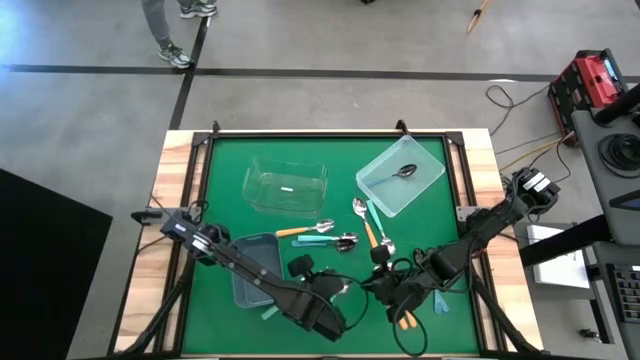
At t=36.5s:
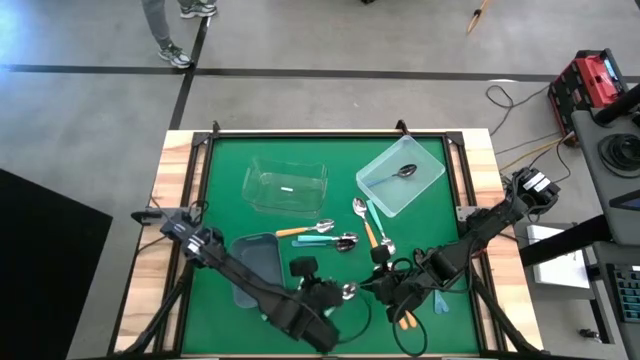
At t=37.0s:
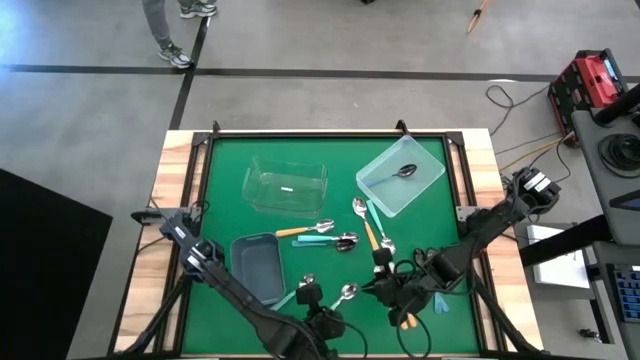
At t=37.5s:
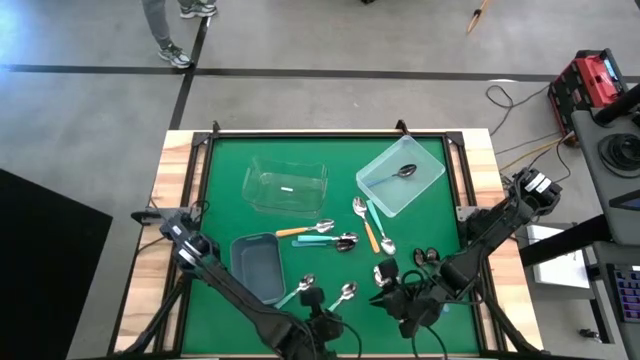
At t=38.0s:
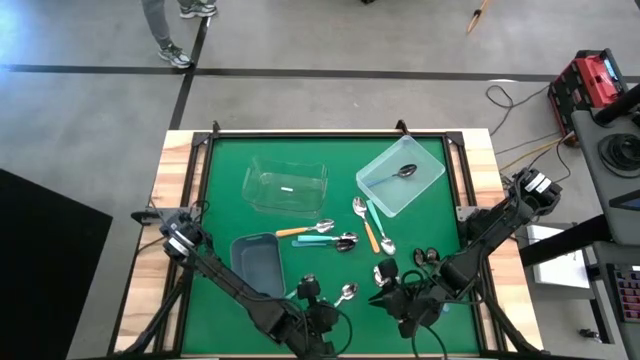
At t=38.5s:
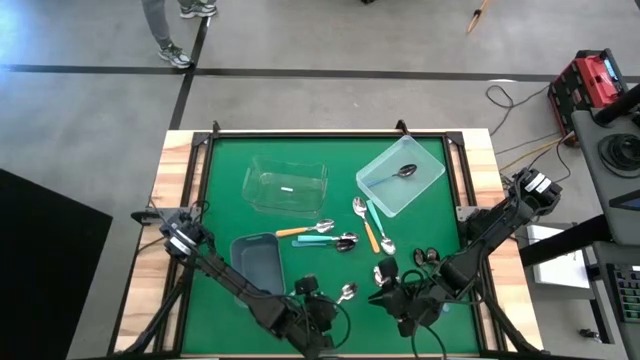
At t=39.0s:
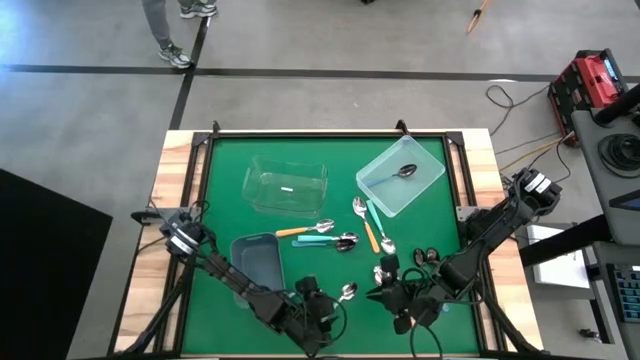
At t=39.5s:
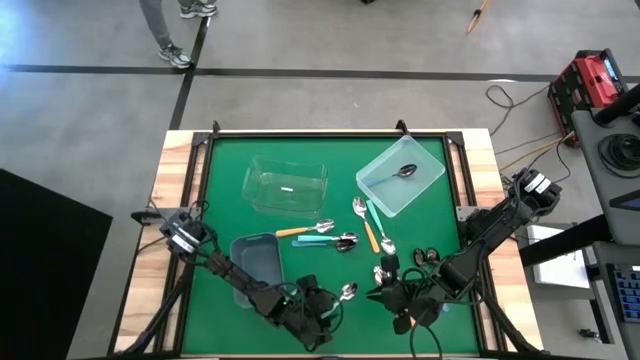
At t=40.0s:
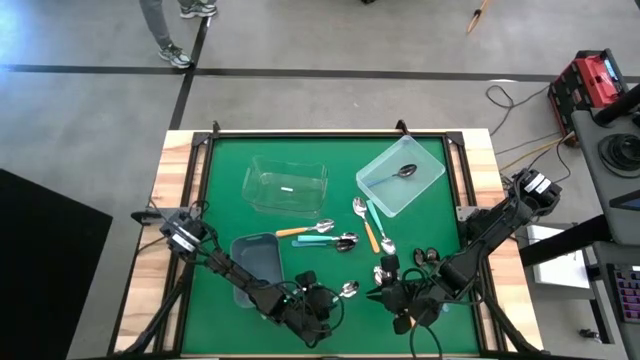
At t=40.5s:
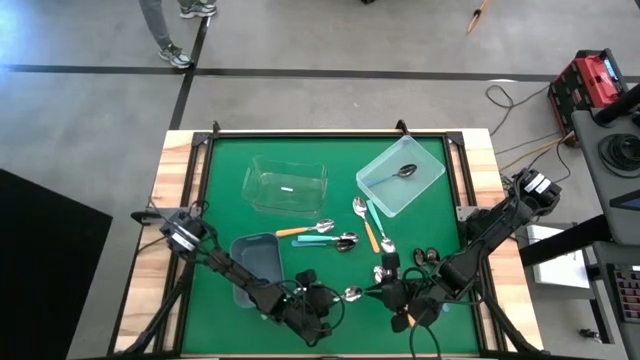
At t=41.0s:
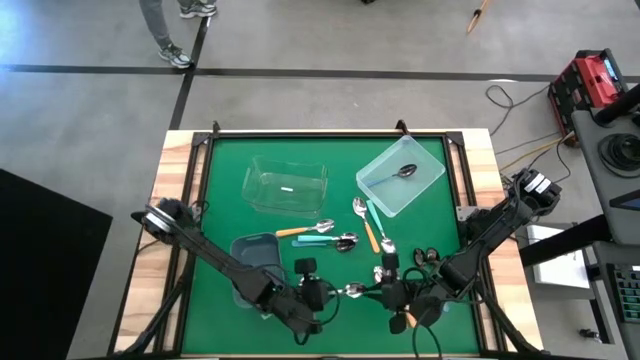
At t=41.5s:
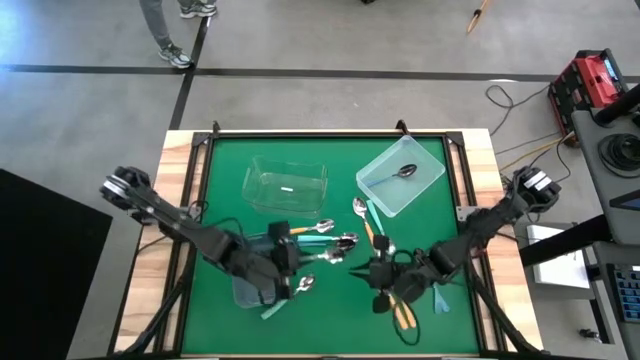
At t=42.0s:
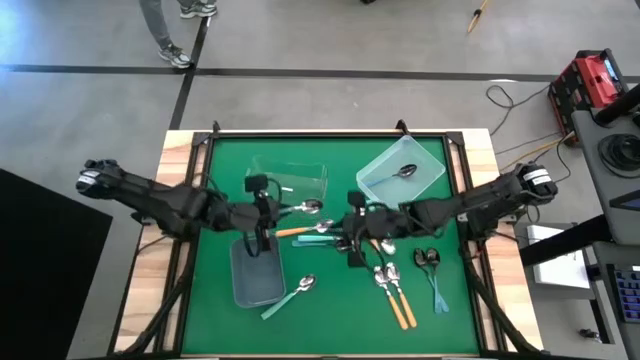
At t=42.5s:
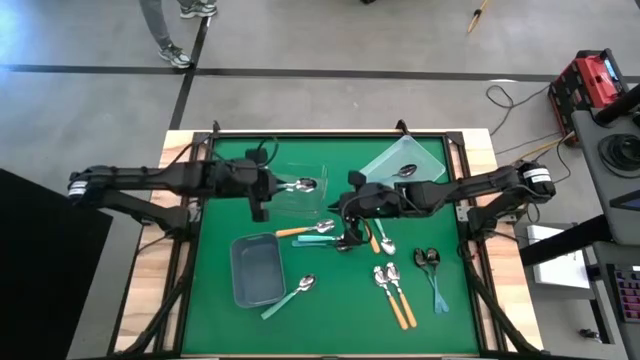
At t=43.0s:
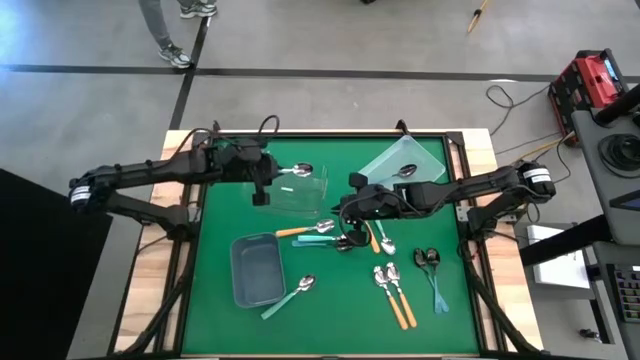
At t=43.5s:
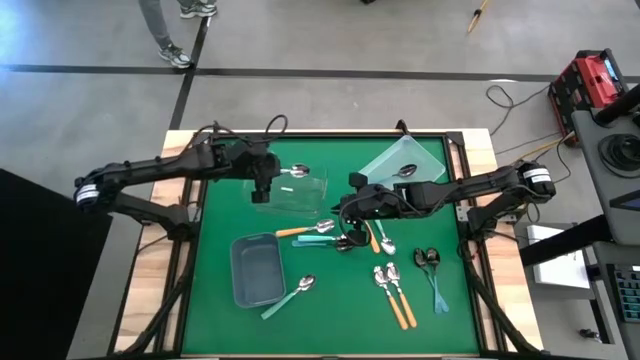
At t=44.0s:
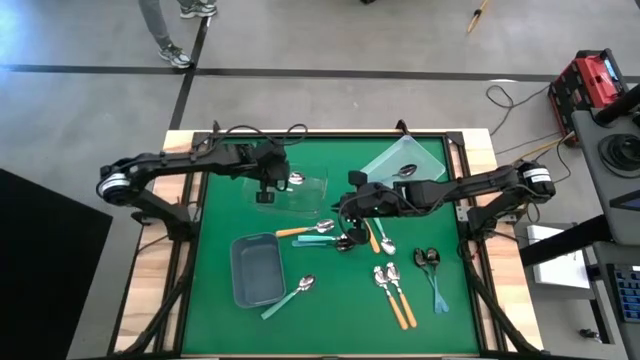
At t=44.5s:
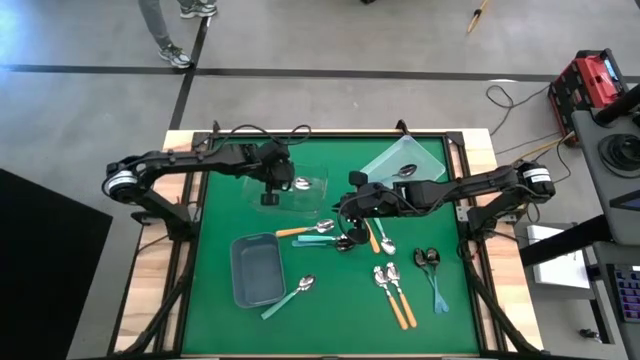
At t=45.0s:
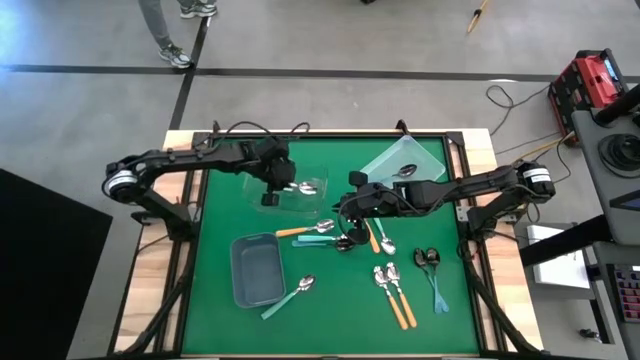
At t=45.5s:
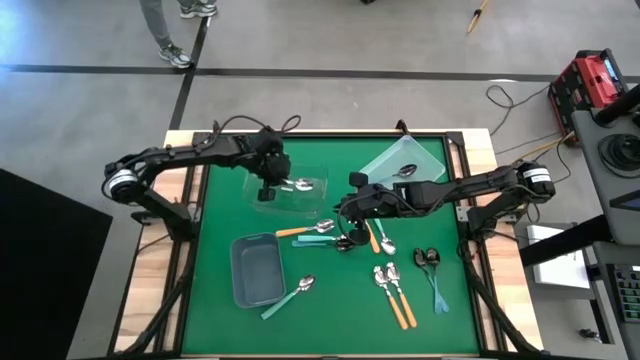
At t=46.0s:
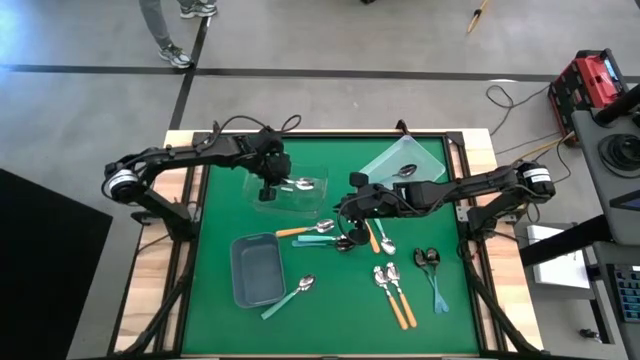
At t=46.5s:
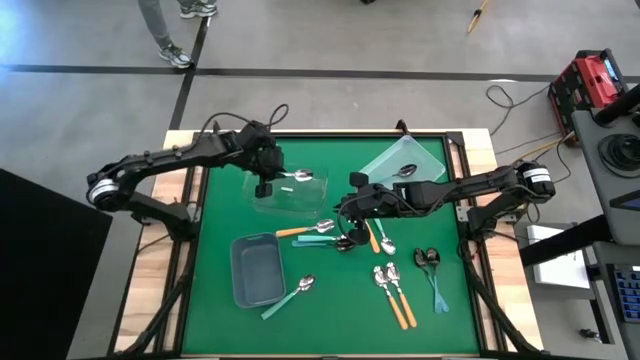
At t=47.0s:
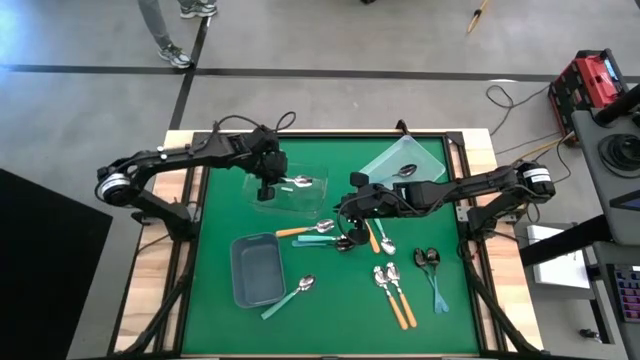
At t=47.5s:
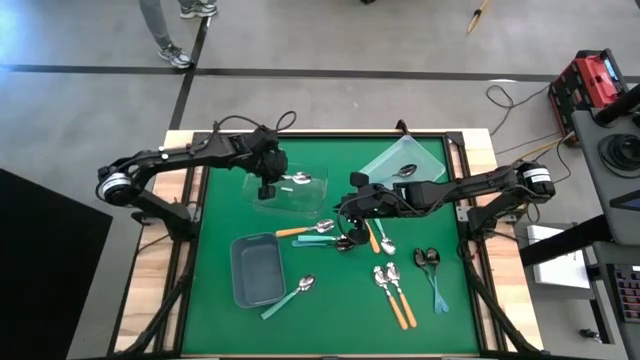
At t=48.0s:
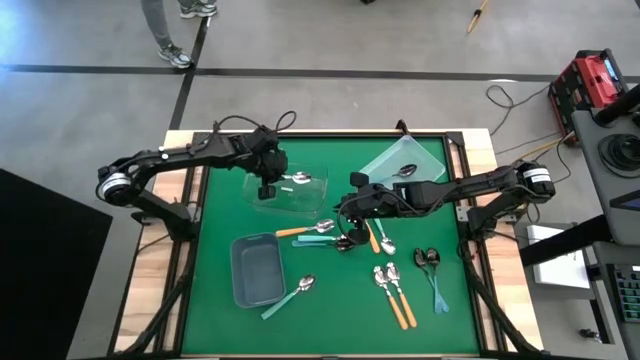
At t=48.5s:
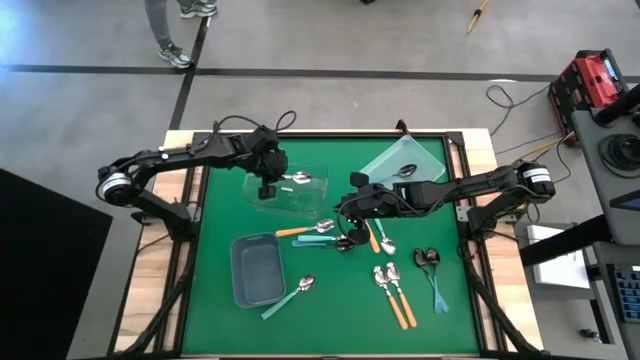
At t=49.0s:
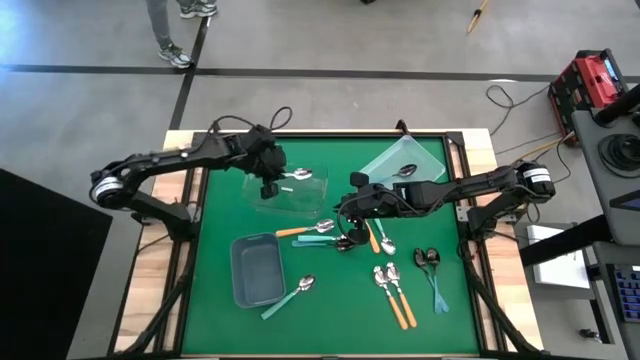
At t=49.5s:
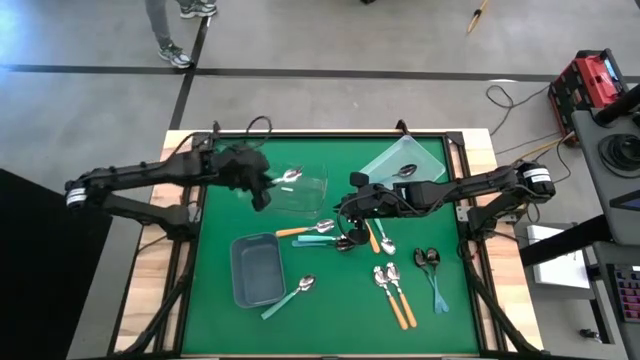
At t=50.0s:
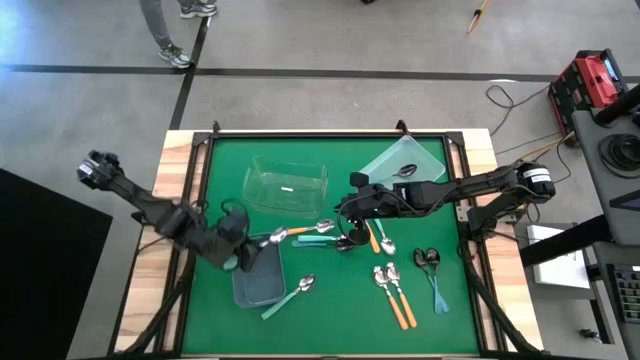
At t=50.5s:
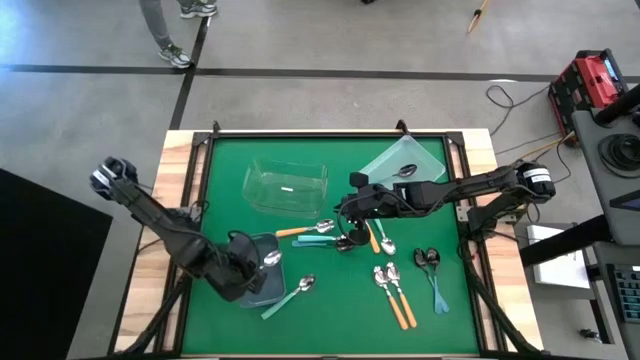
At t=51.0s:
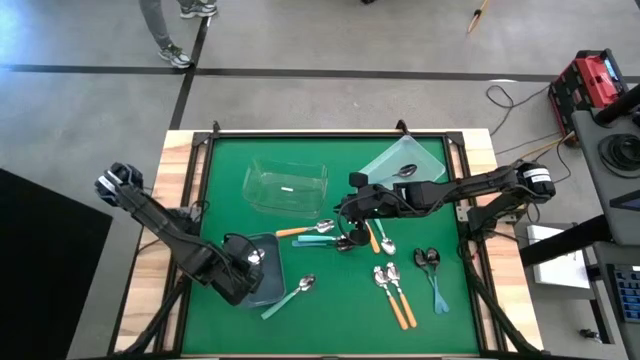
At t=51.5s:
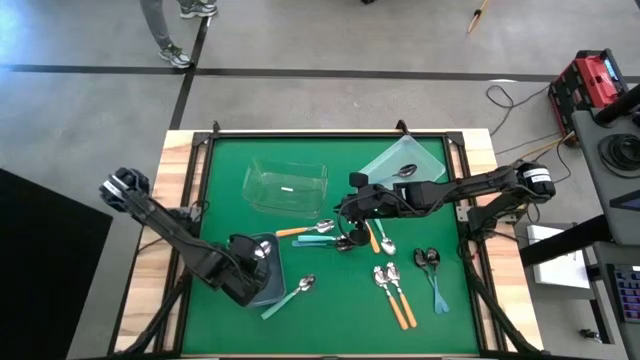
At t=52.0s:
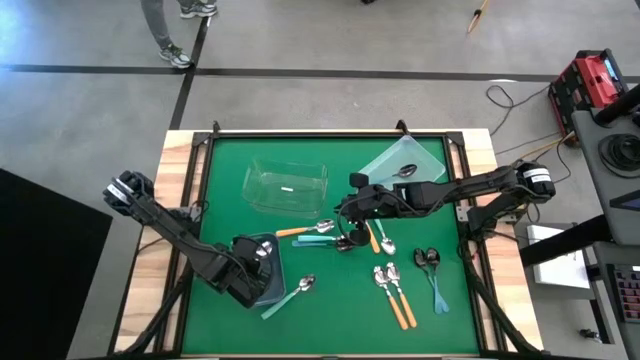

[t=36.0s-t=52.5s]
Task: Sort silverware by color (type)
Put the light blue spoon into the gray bin
